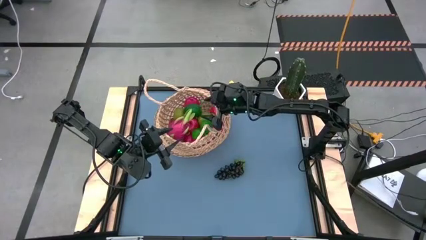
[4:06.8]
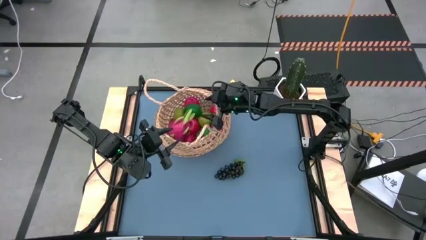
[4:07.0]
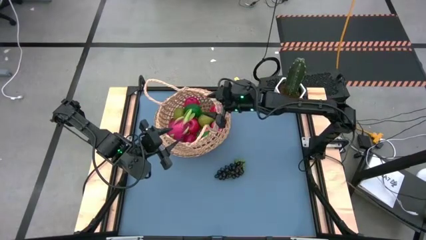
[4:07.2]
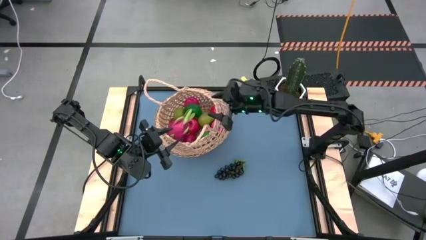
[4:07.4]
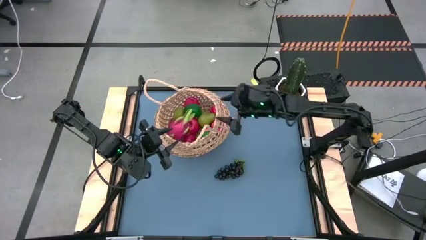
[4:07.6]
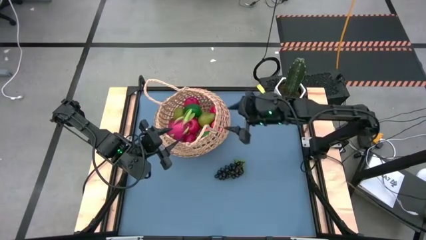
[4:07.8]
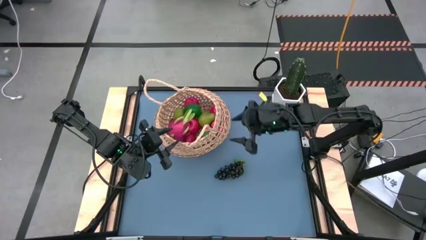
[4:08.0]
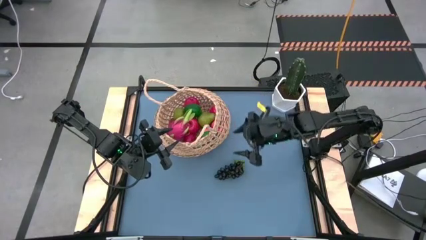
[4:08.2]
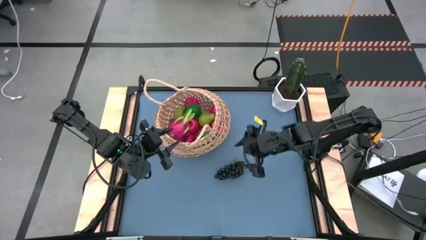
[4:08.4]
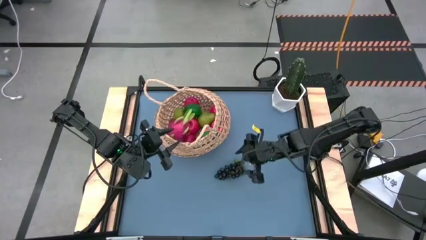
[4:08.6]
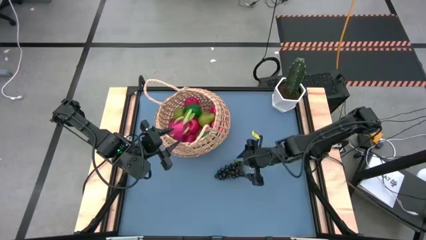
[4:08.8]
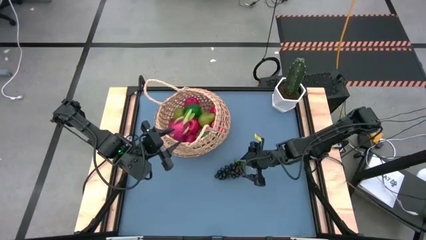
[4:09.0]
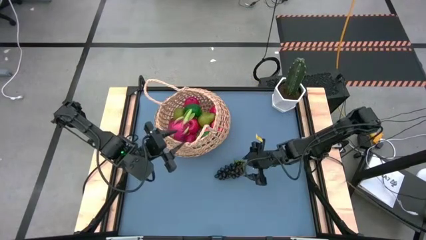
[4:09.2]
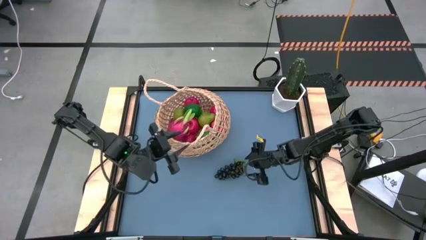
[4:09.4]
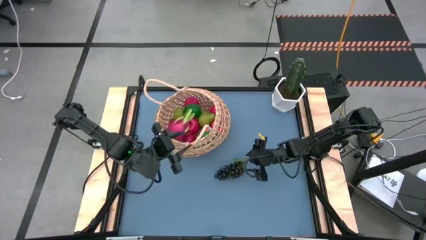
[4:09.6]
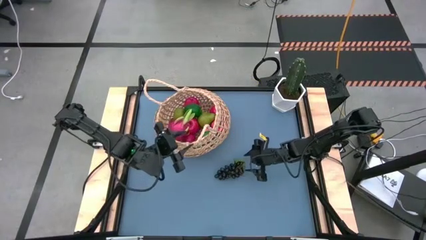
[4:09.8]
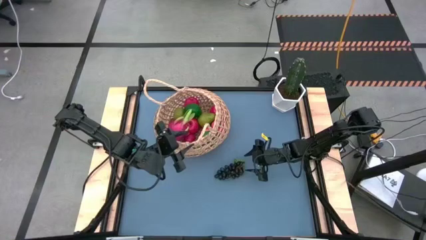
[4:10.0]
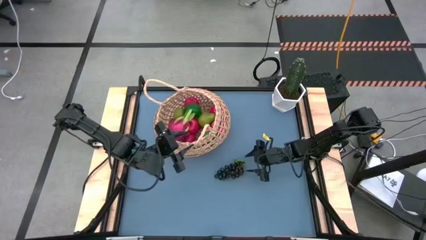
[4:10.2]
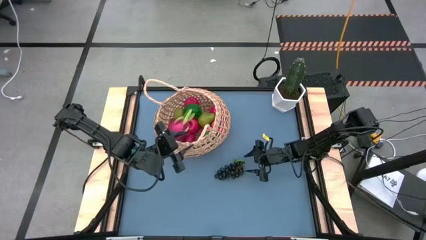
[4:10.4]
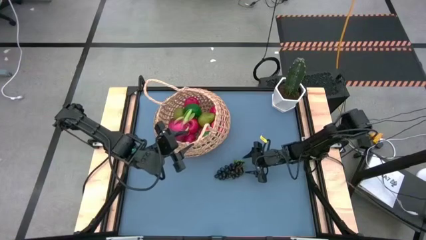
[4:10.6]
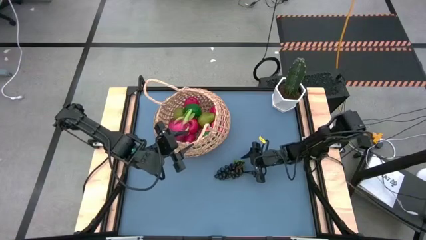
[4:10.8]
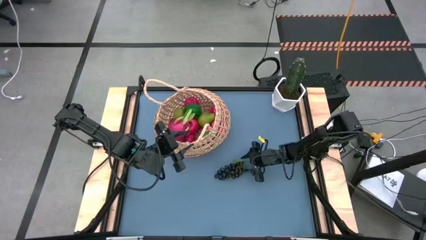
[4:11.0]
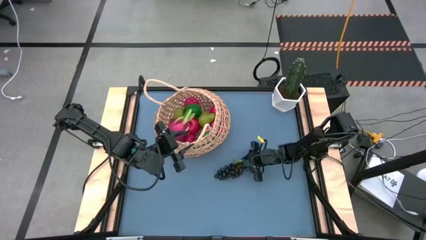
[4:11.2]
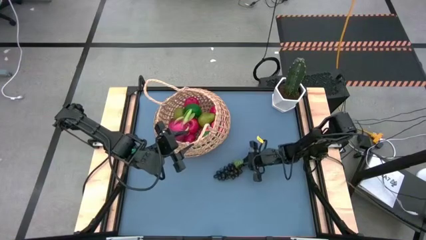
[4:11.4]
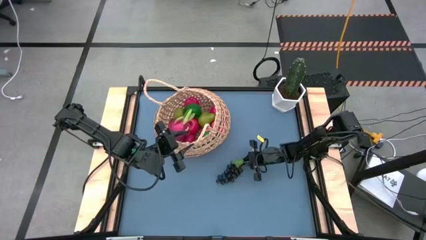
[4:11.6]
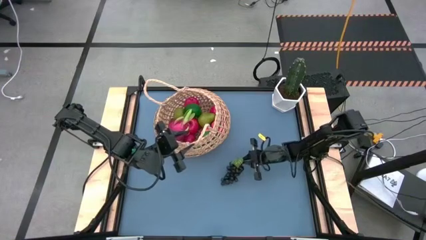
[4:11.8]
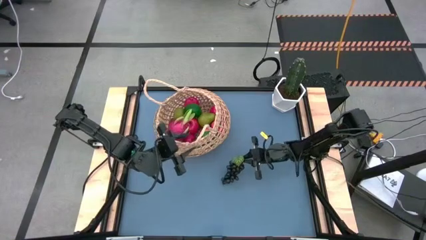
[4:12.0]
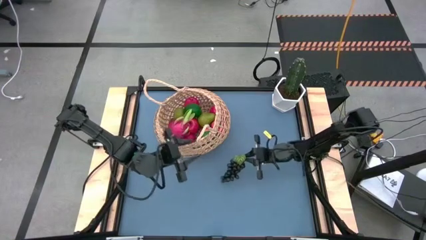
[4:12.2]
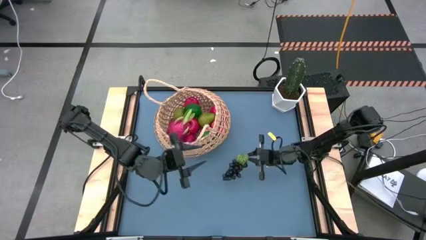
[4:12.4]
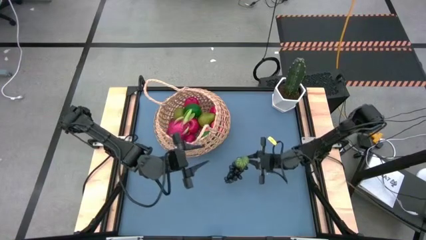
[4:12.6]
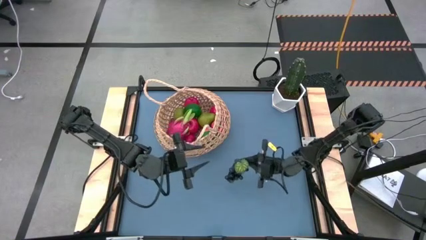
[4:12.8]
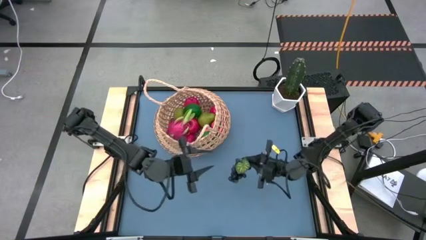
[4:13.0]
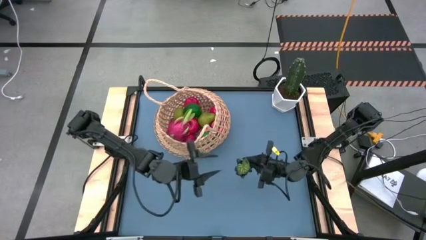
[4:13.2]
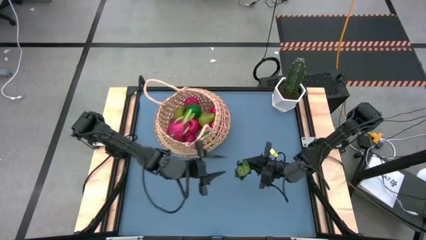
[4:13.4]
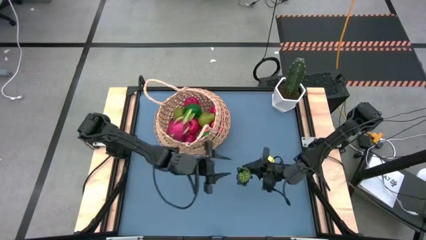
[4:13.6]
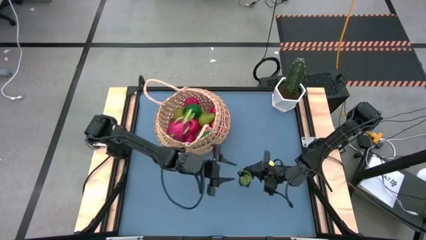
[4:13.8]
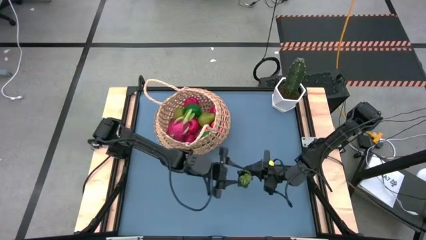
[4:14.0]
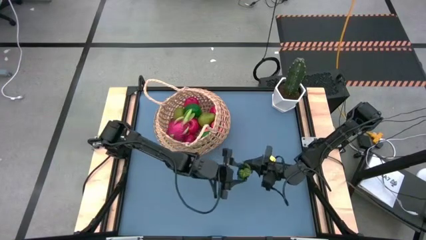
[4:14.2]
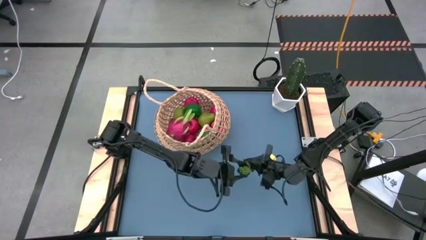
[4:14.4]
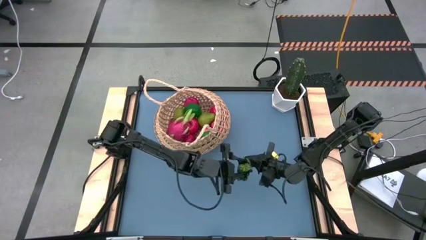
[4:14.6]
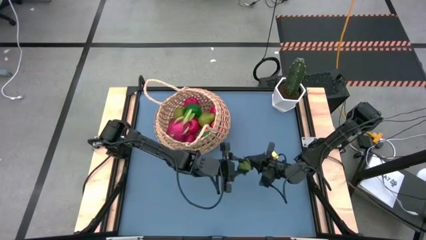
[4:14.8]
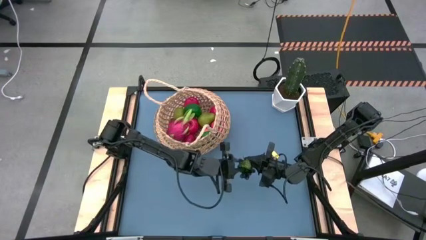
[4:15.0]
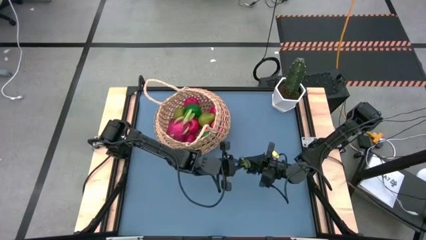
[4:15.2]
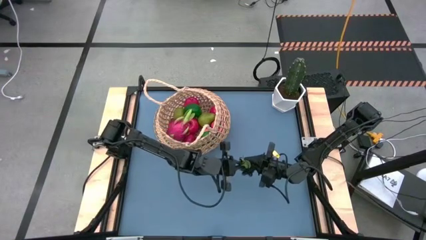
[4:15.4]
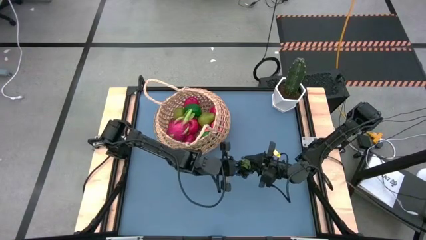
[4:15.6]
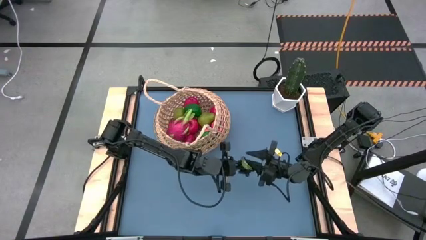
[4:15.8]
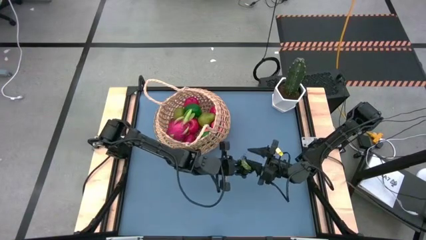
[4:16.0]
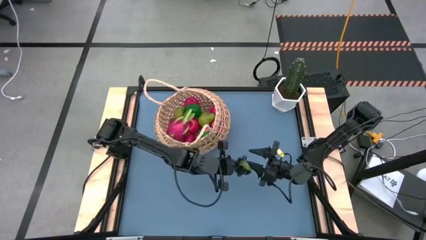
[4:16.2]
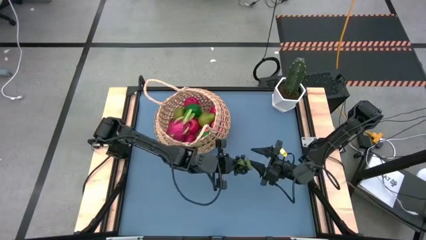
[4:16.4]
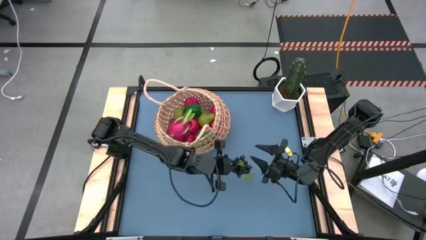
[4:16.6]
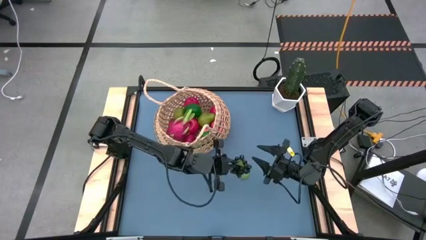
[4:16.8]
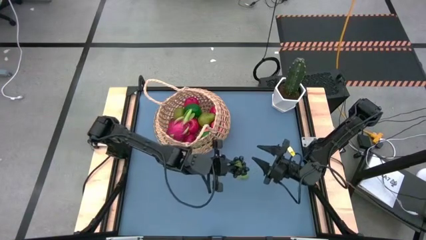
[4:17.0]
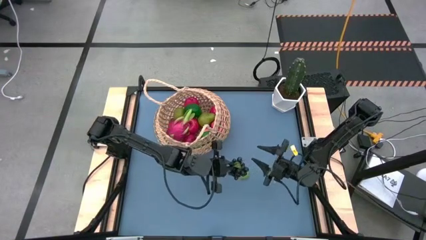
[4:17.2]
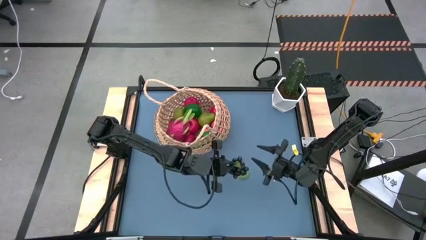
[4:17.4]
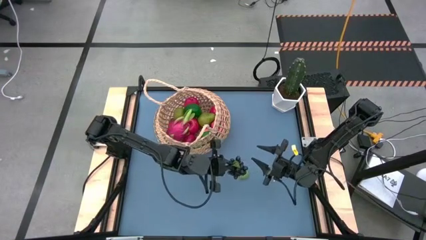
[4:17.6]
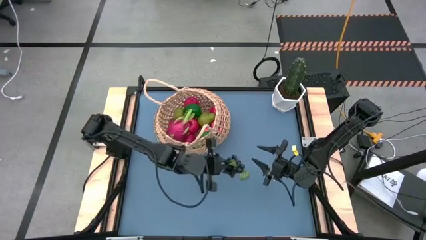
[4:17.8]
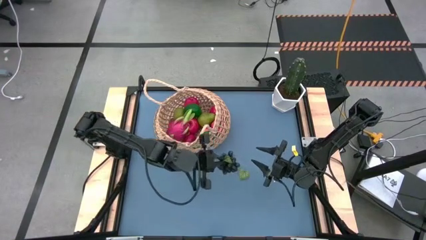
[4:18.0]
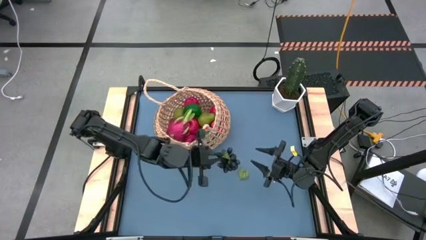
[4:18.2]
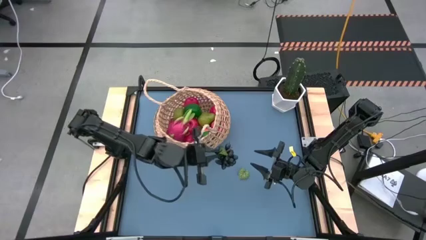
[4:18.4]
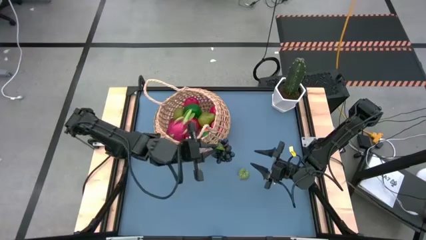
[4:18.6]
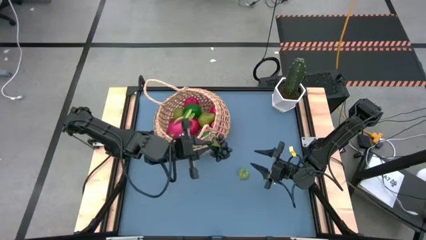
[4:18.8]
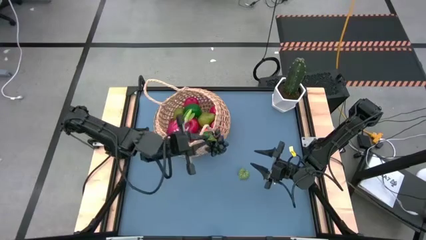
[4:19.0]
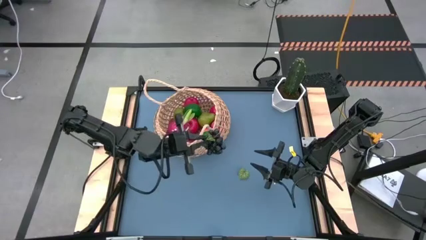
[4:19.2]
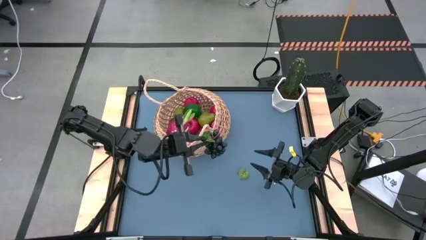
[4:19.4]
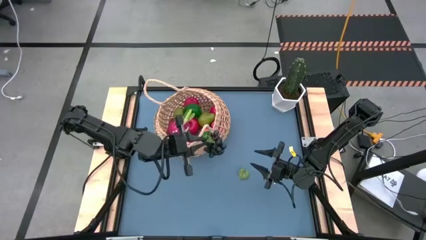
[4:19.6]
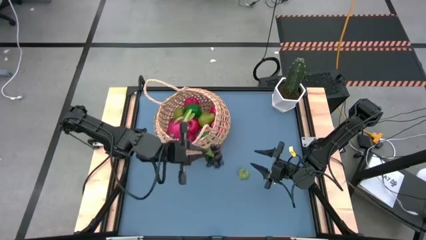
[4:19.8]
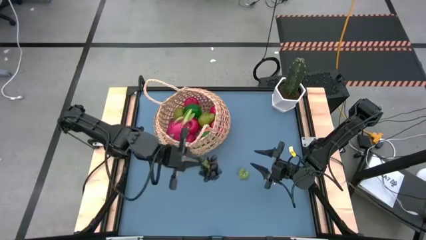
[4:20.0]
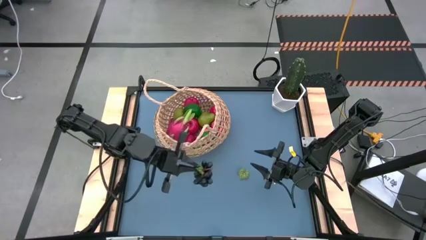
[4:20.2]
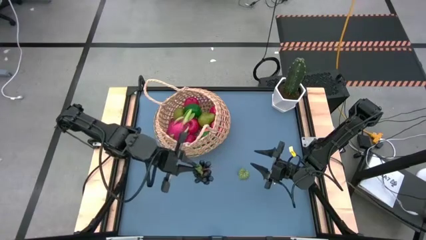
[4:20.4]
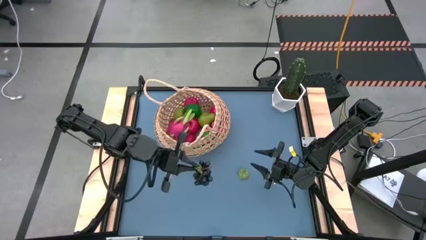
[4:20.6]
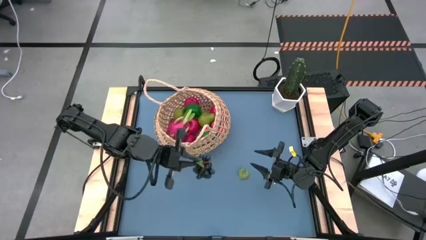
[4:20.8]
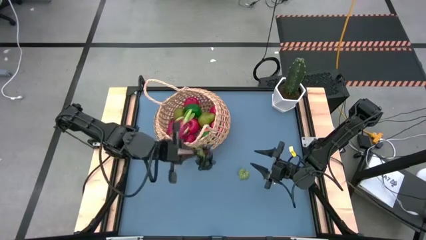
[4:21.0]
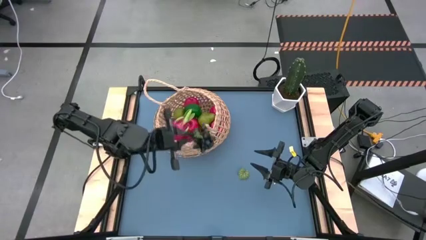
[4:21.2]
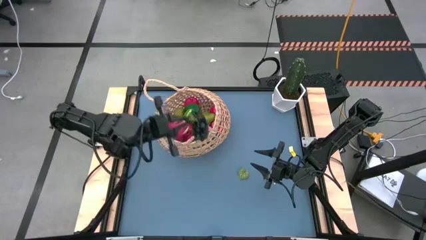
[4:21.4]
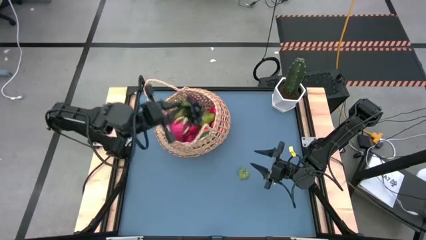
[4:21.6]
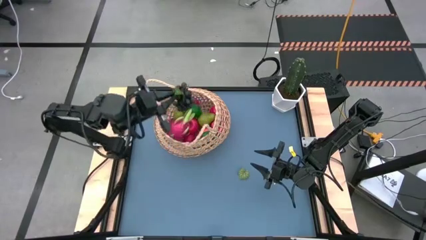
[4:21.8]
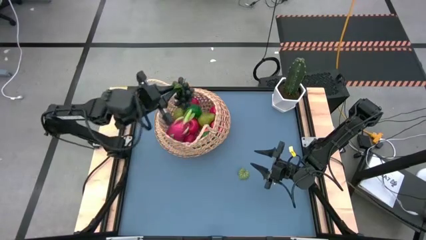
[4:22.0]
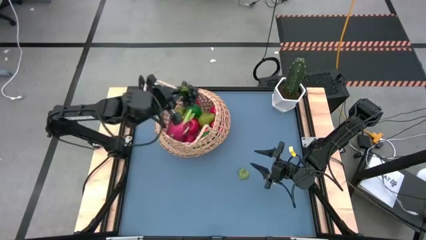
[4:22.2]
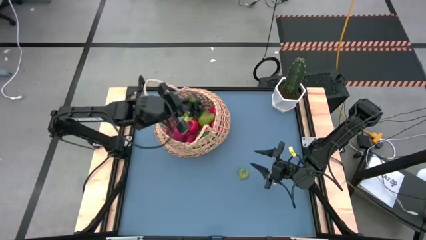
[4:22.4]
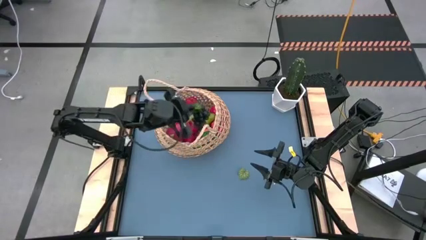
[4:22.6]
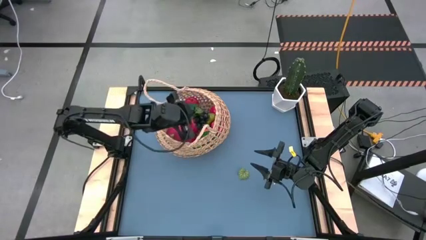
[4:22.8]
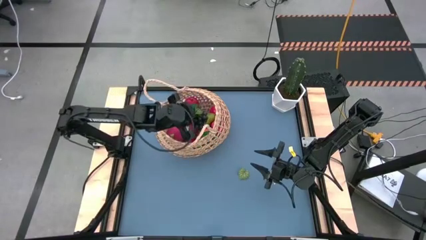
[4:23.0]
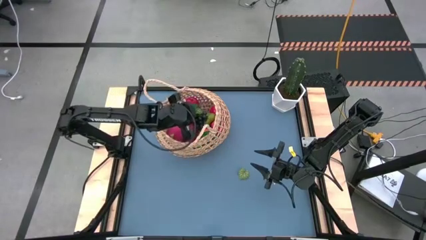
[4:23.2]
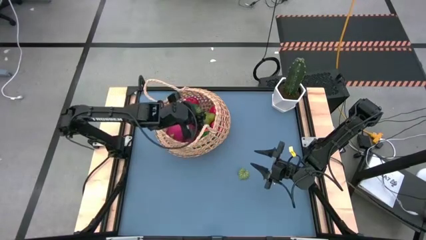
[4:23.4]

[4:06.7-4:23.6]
Task: Build produce basket
Put the black grapes into the basket
